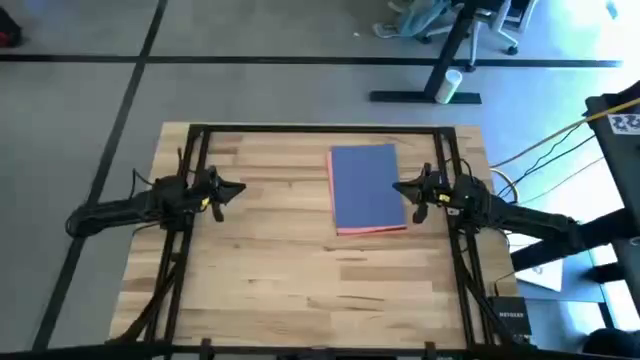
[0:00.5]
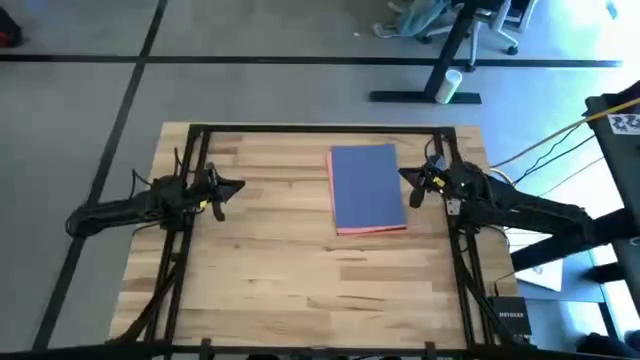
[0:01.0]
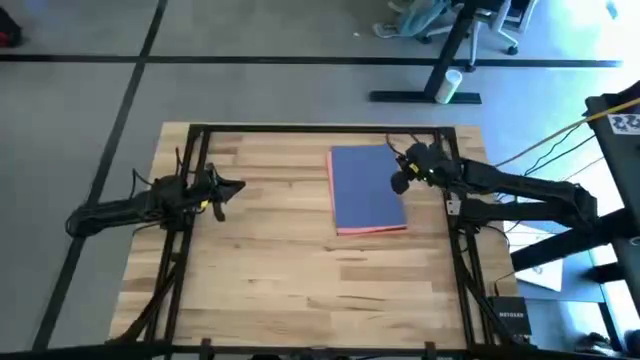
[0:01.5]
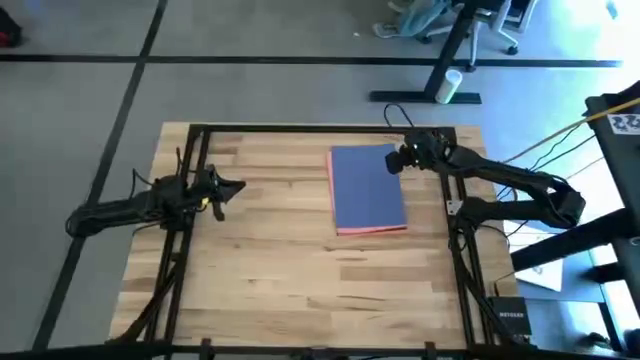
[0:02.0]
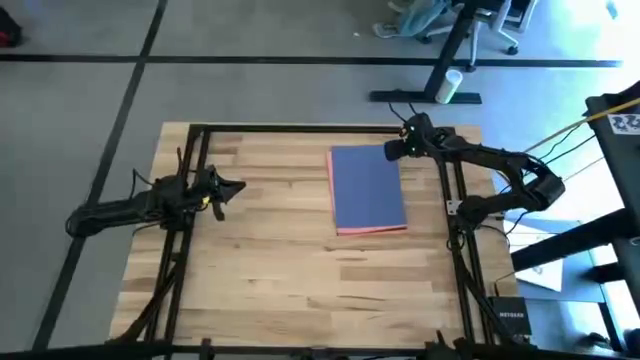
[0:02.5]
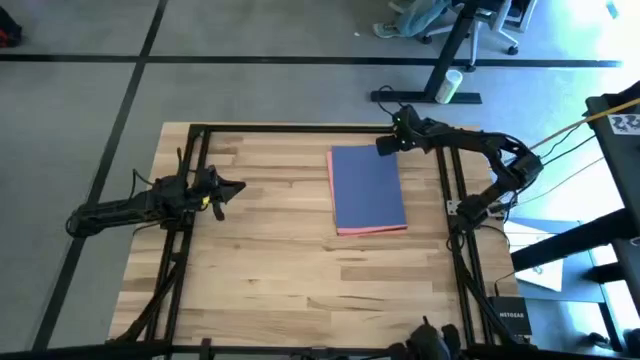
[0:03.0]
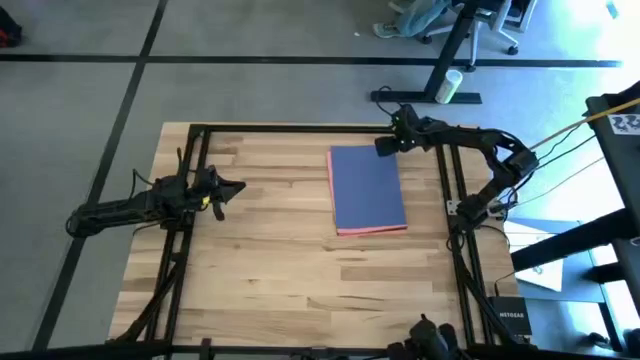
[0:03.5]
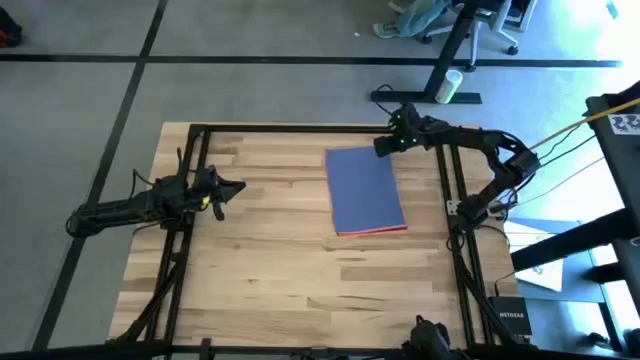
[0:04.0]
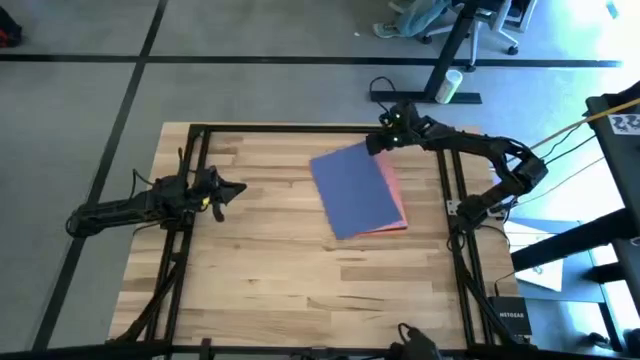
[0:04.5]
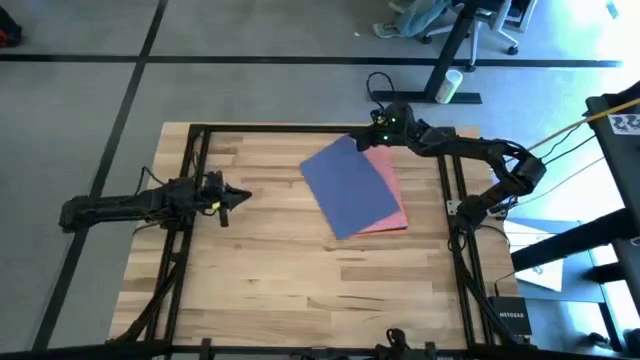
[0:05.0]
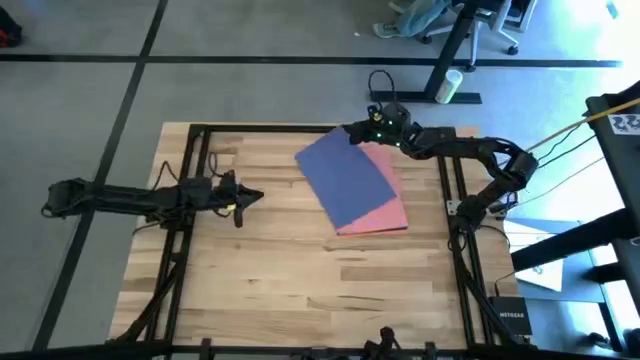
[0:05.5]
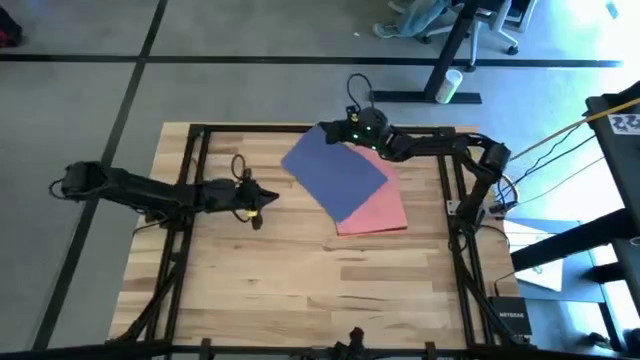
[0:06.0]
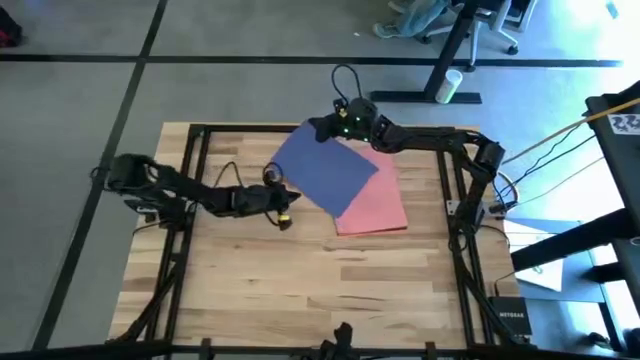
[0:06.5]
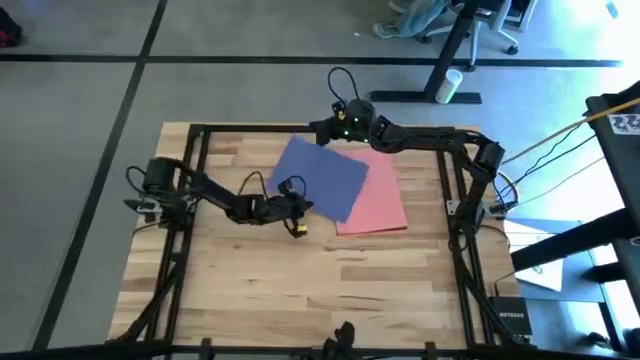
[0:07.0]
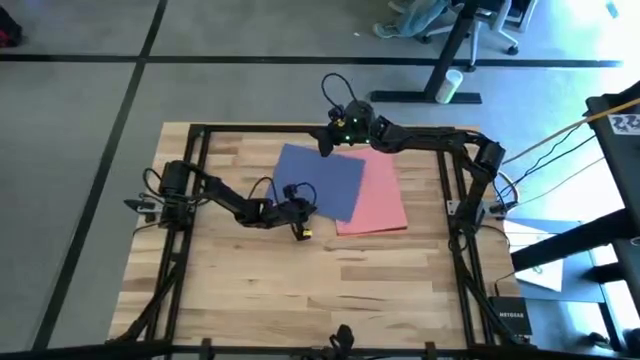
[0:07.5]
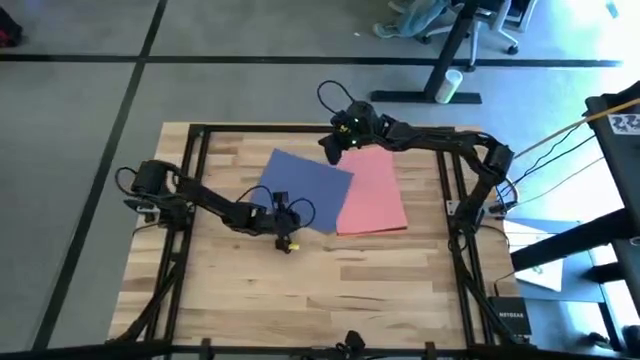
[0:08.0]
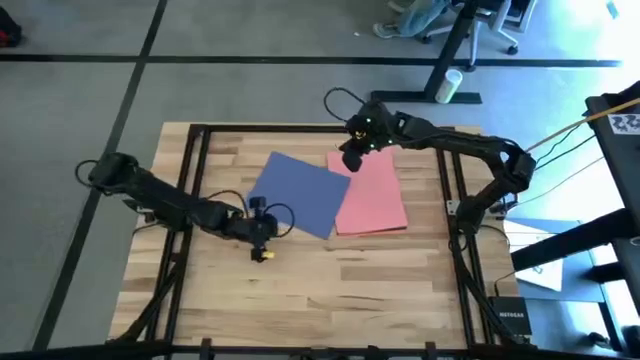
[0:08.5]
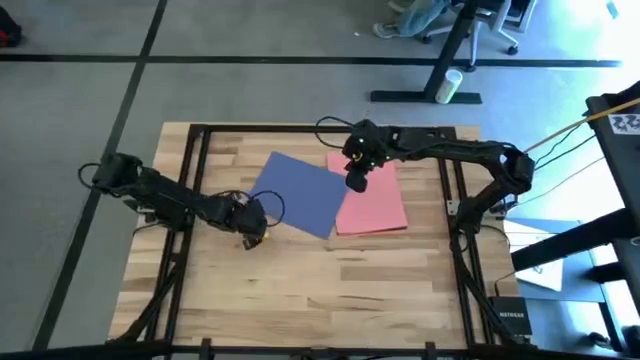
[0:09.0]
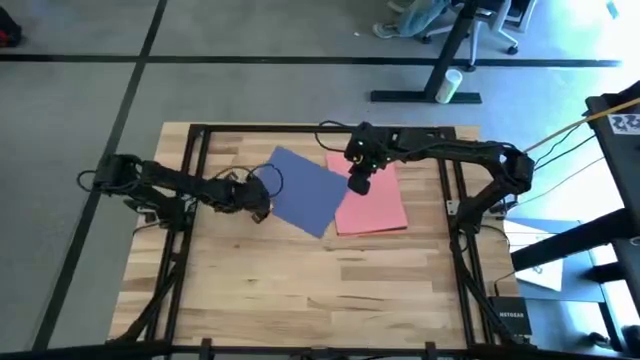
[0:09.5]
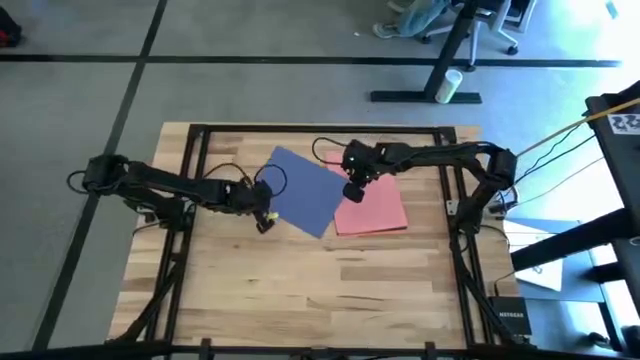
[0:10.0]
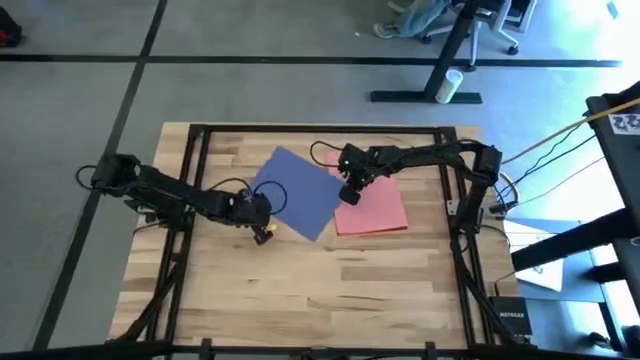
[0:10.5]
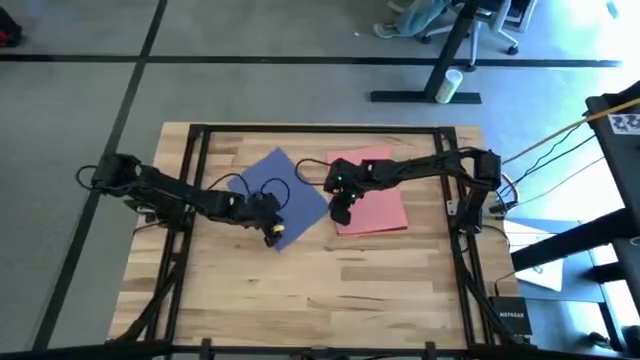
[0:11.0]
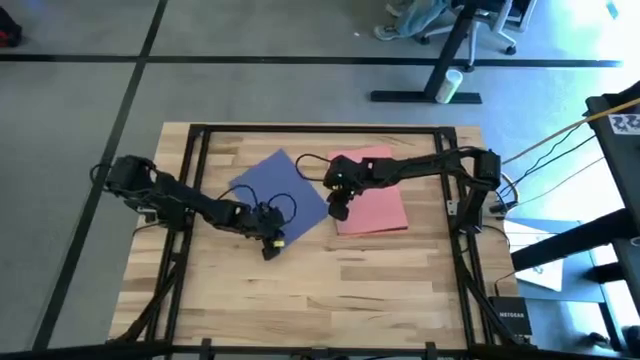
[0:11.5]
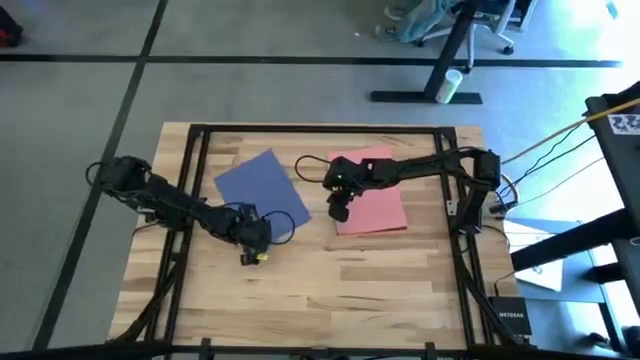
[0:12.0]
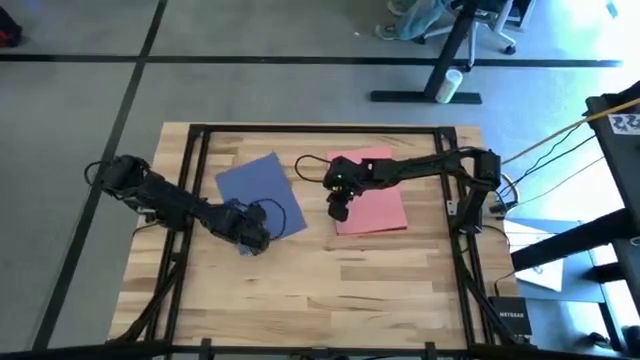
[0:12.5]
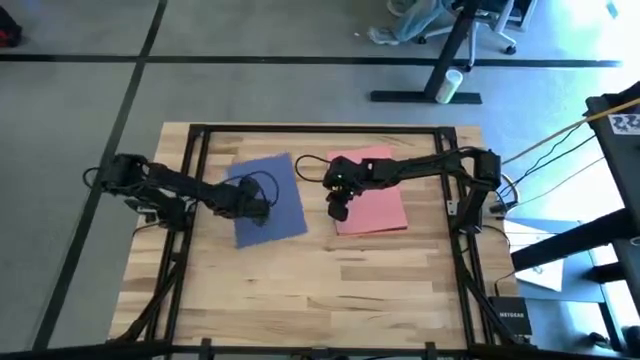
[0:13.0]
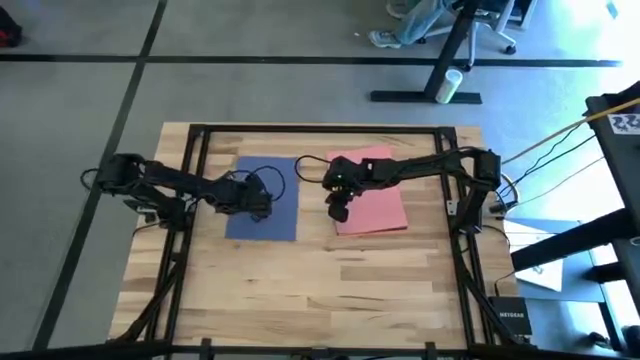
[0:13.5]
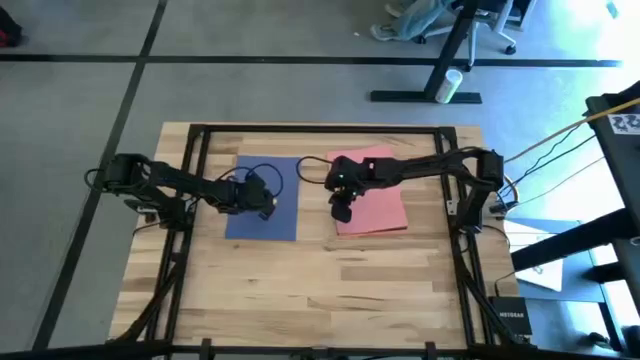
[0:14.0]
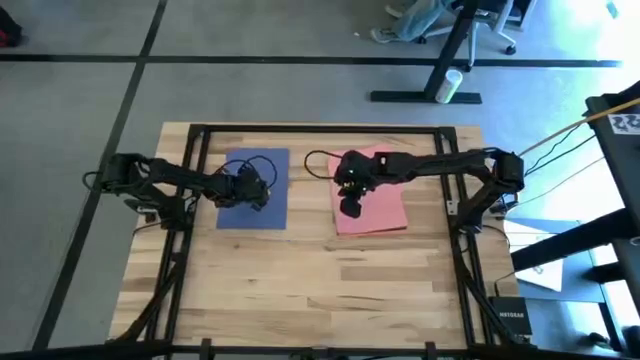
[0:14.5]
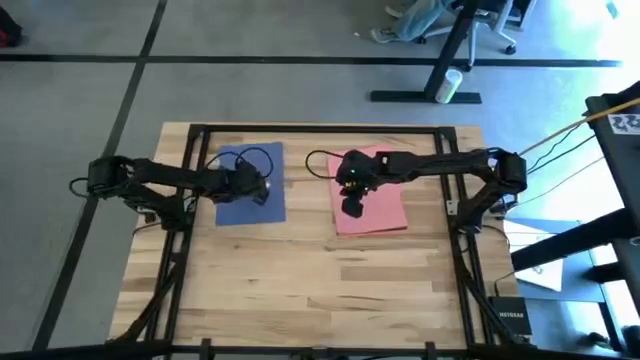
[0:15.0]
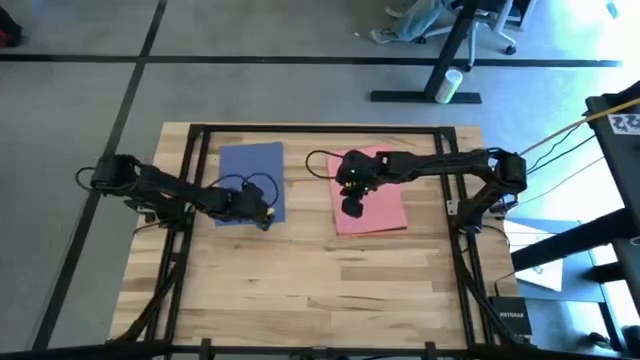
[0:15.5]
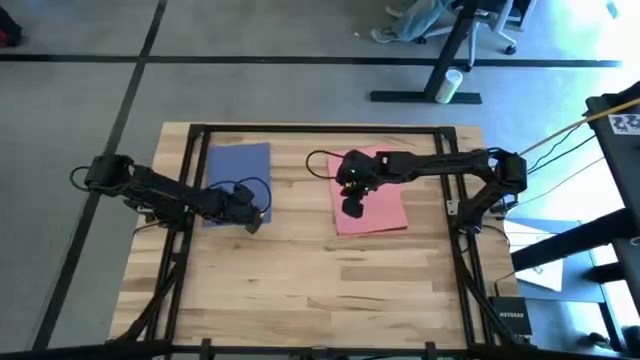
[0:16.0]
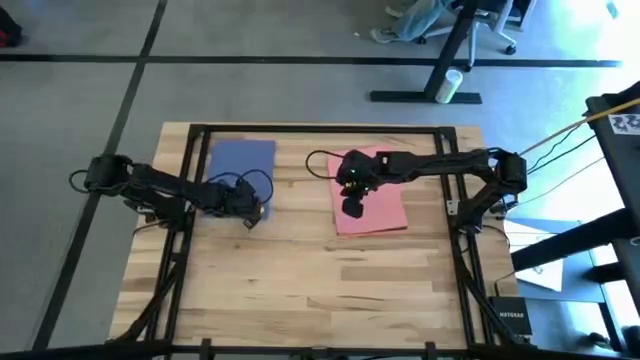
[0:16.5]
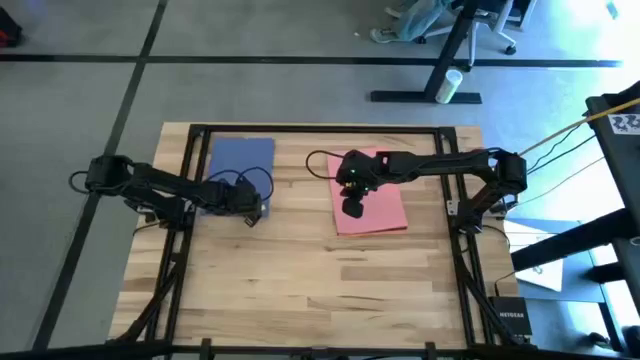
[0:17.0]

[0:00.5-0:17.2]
Task: Organize paper
Move the violet paper to the top left of the table
